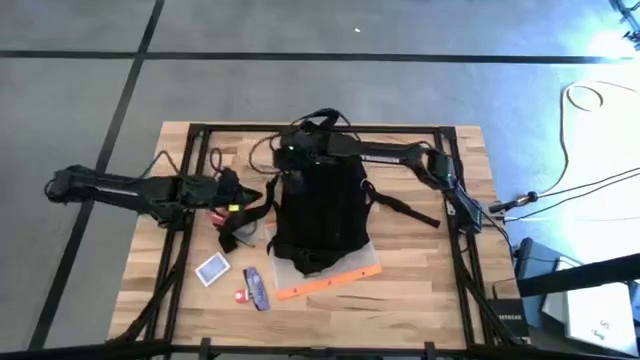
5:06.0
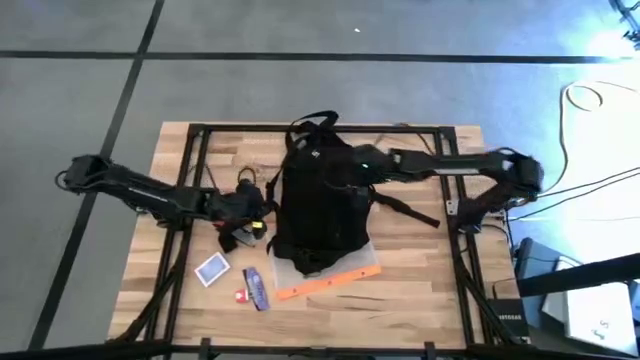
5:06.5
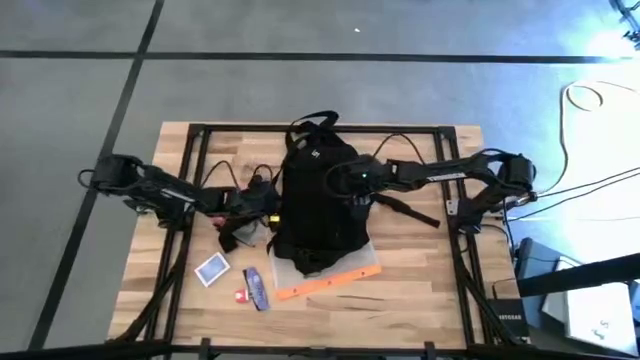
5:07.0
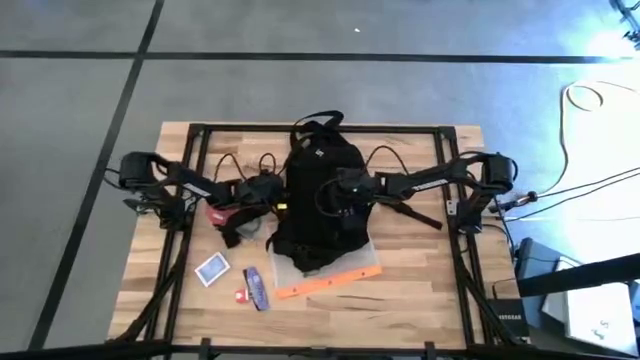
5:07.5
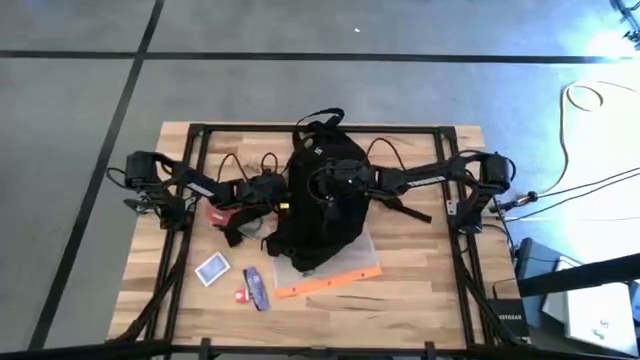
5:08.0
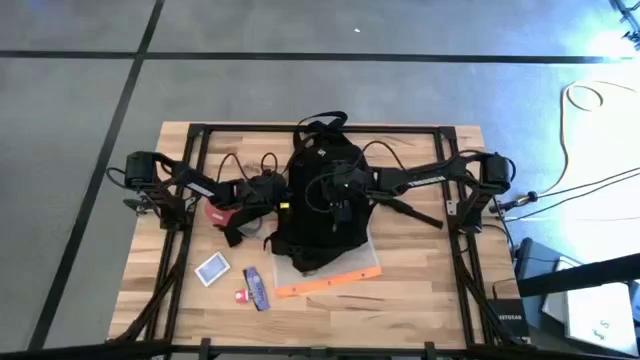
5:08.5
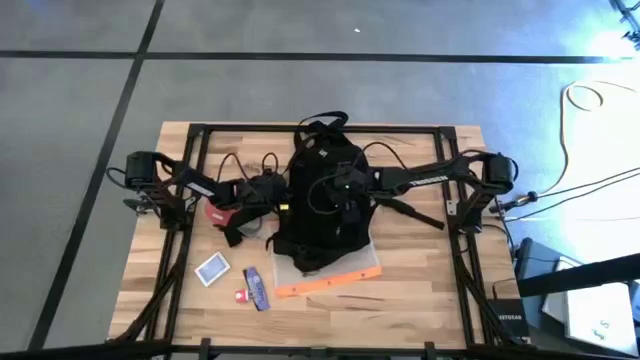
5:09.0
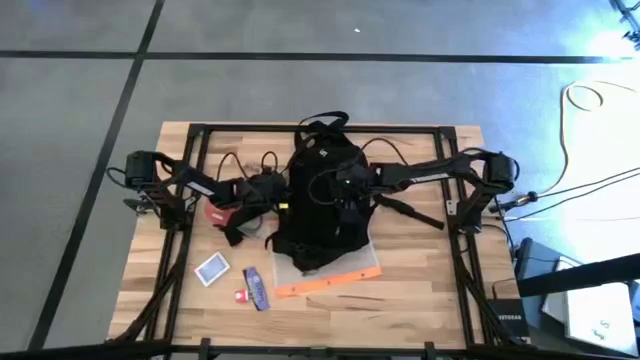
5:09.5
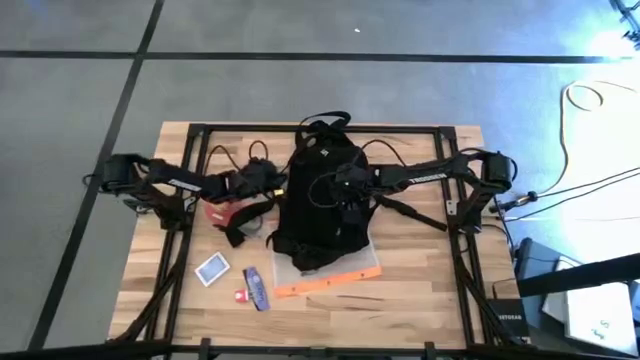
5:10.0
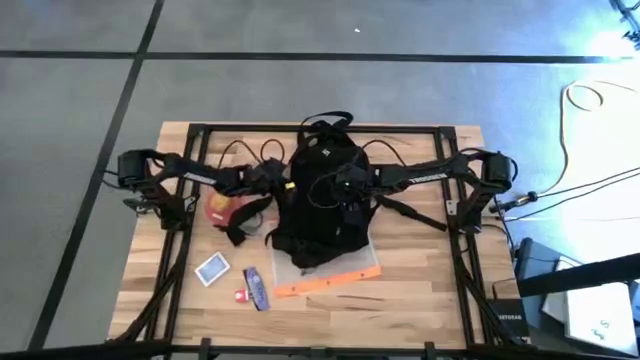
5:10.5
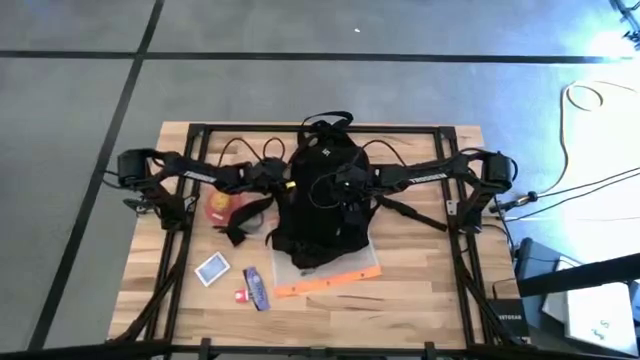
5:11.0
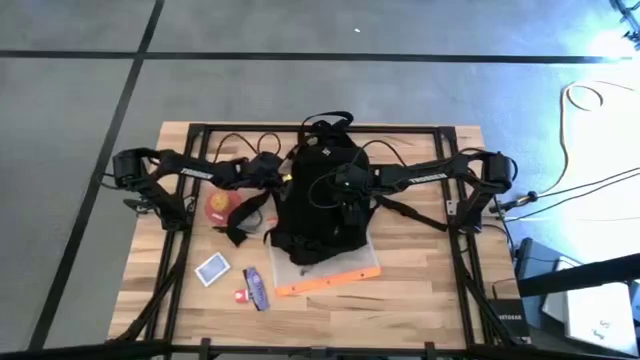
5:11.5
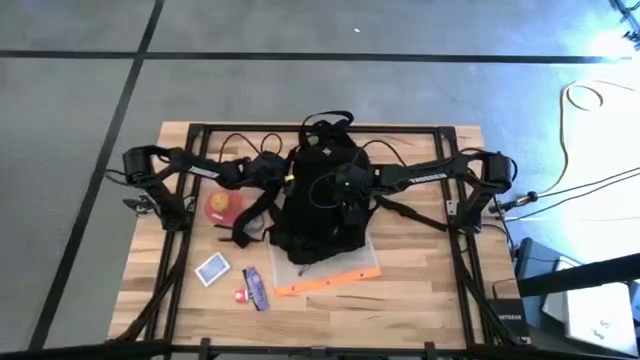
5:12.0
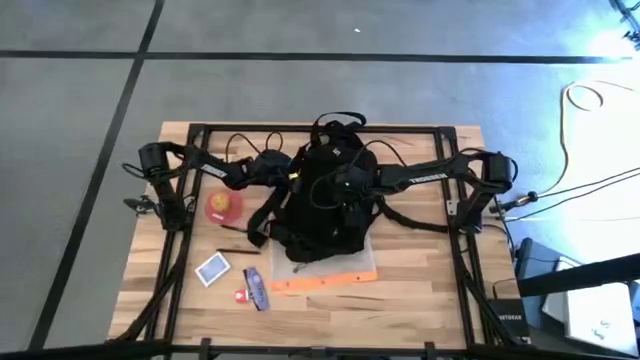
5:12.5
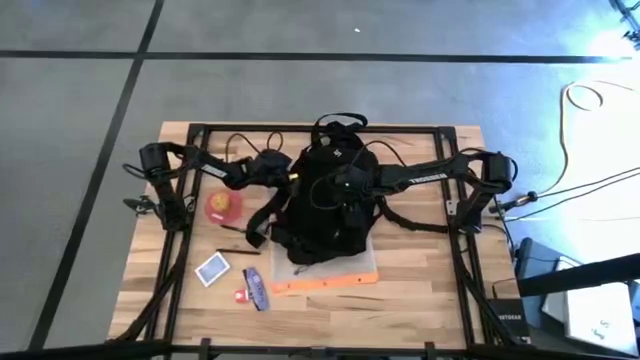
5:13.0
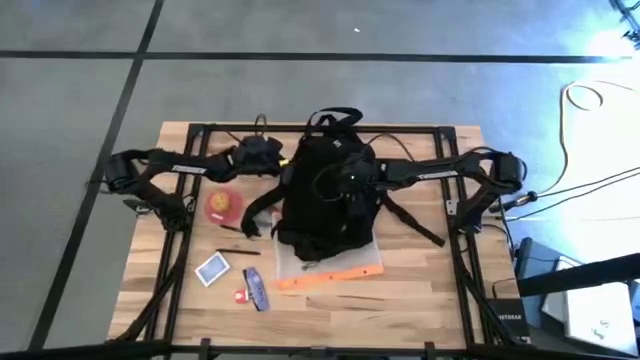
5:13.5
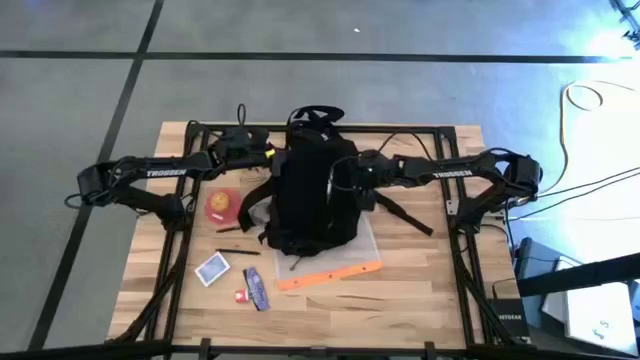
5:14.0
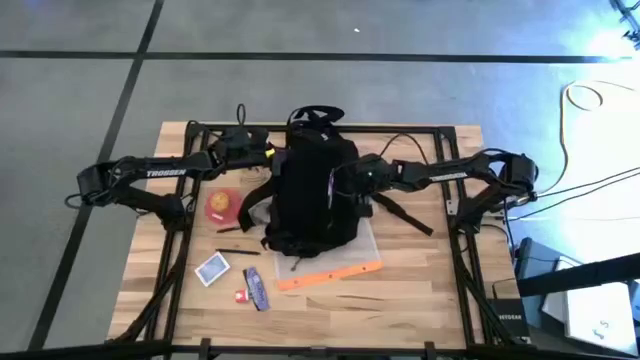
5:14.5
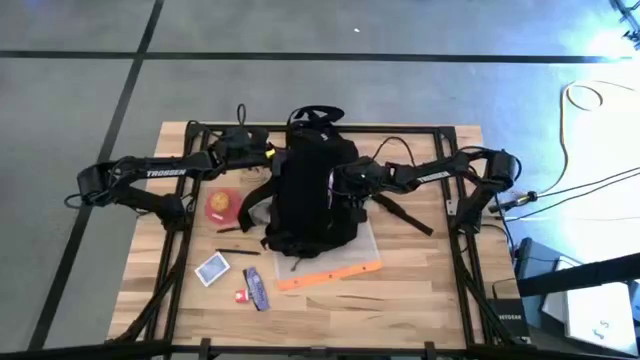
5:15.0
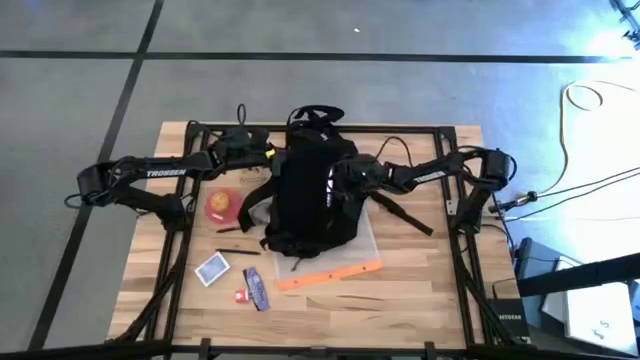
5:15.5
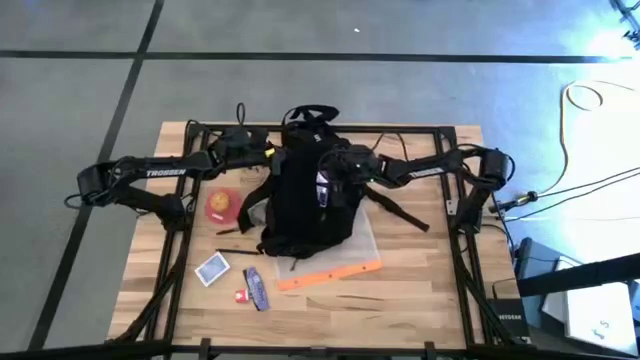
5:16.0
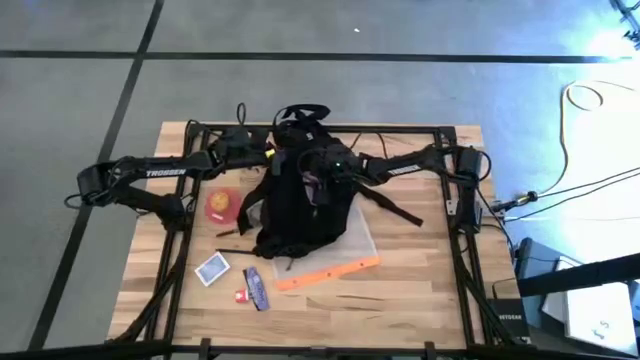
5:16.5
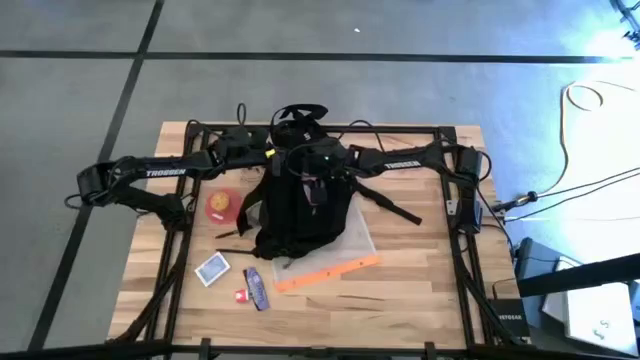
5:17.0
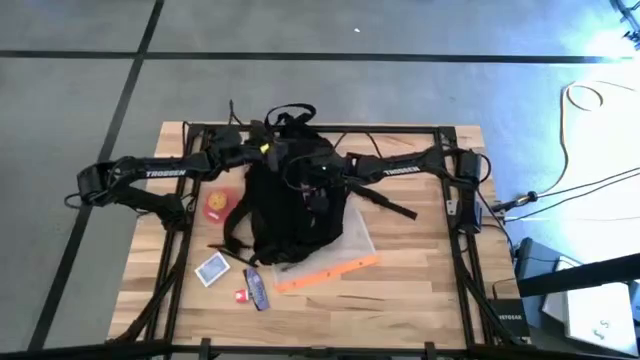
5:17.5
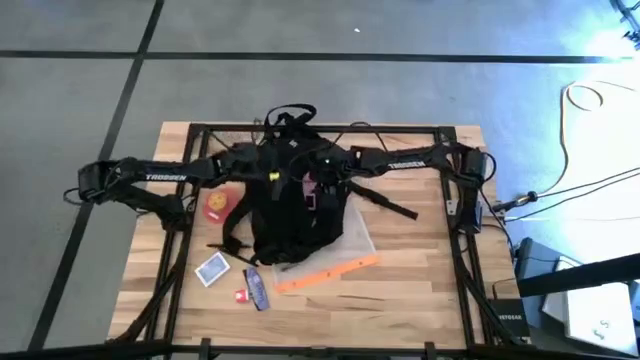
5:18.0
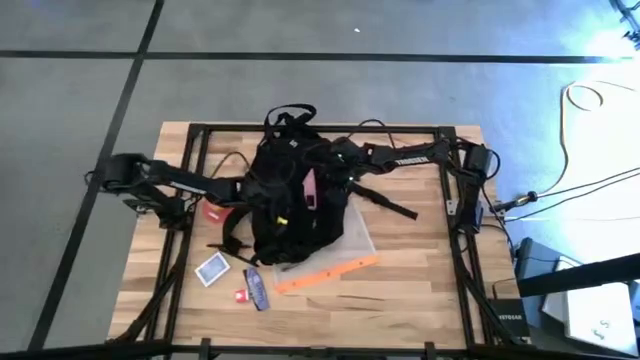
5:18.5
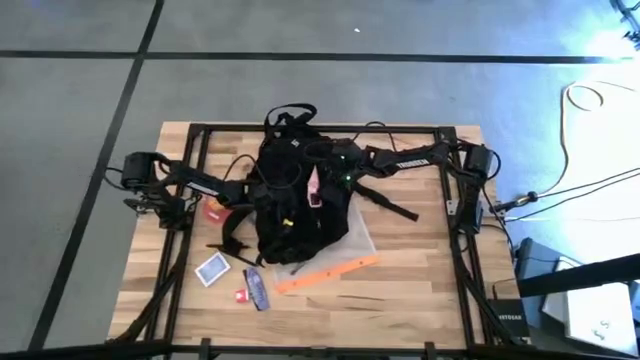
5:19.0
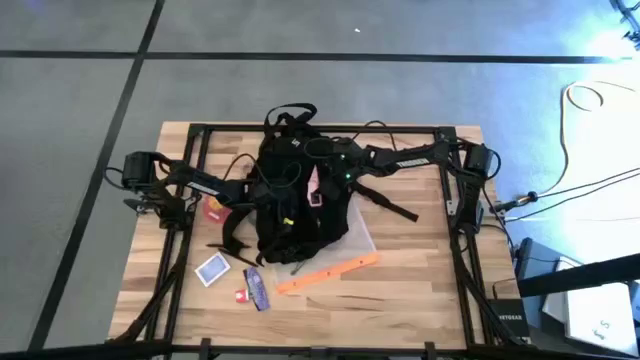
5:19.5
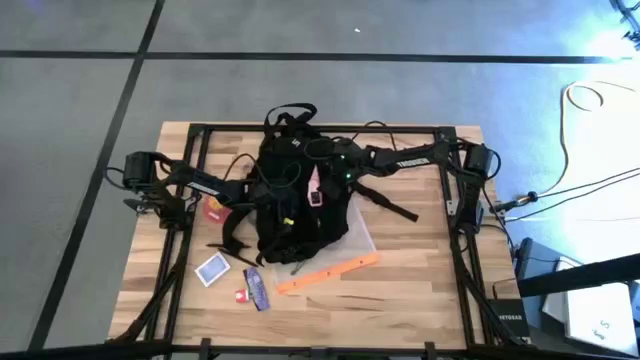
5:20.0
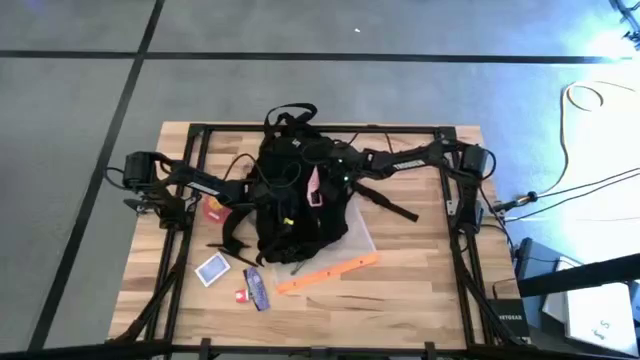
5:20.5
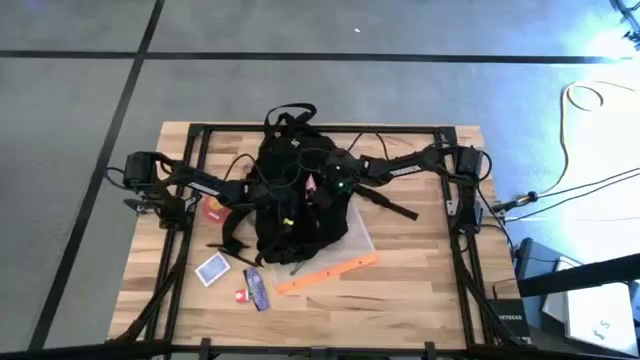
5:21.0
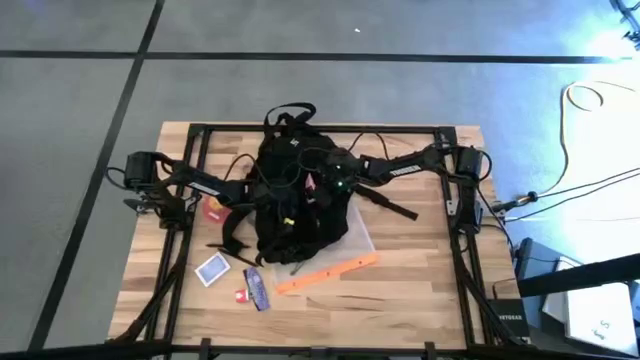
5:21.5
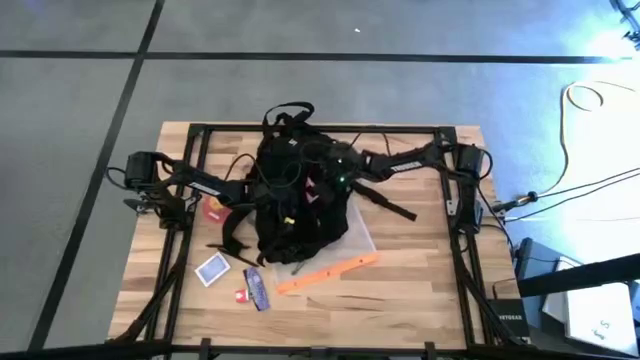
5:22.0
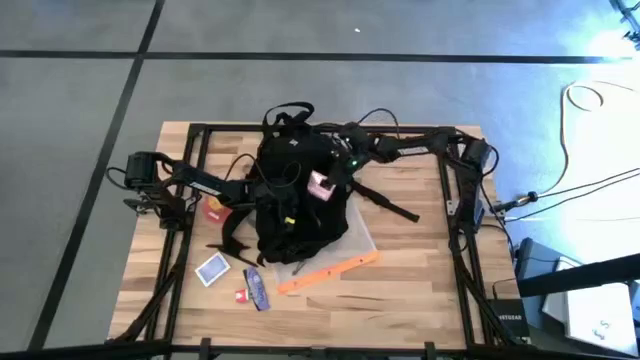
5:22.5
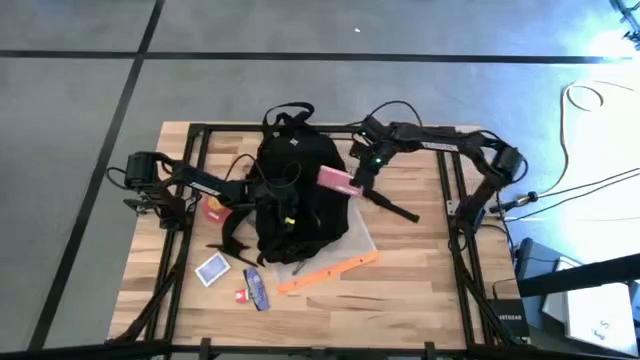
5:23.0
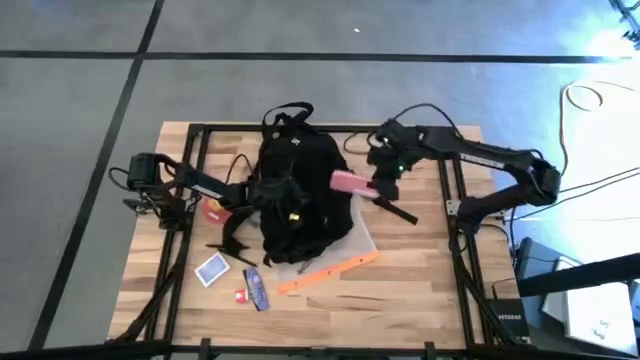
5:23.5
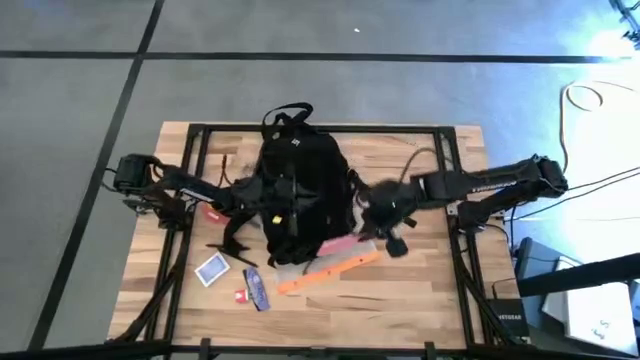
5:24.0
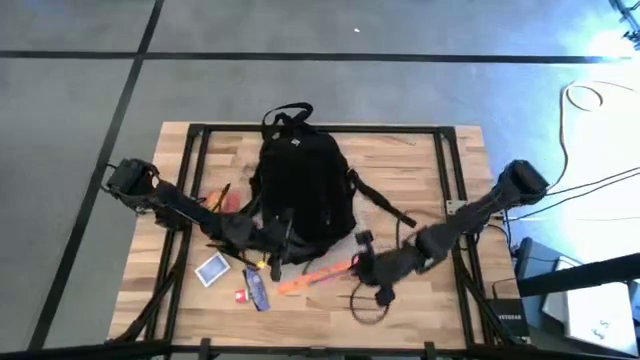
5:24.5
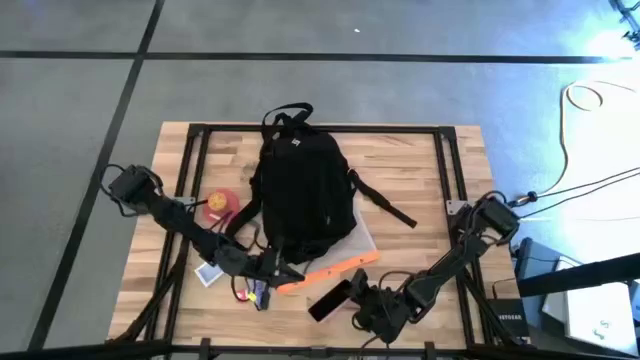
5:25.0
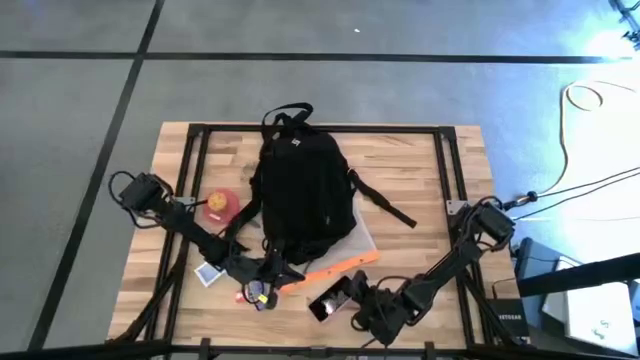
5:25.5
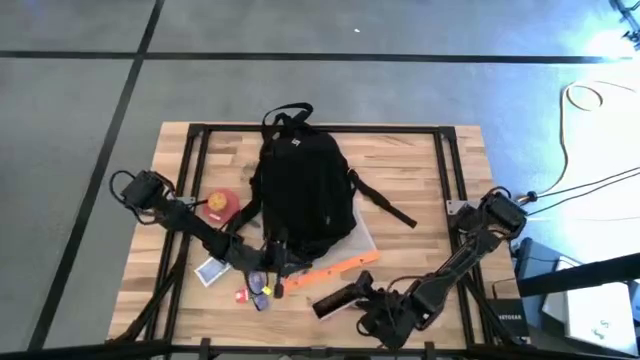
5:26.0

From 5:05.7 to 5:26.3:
Task: Unpack backpack
Remove the pink cellphone from the black backpack

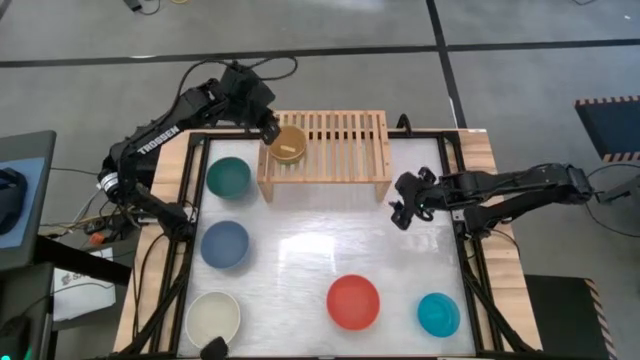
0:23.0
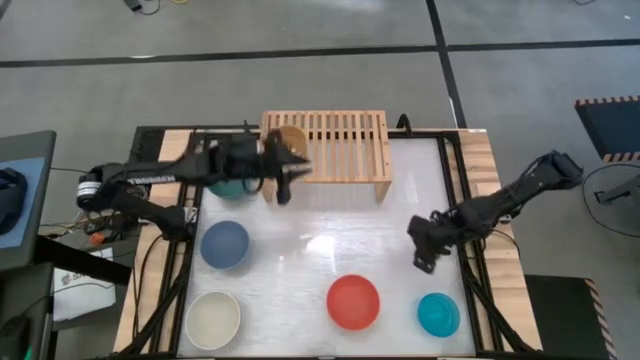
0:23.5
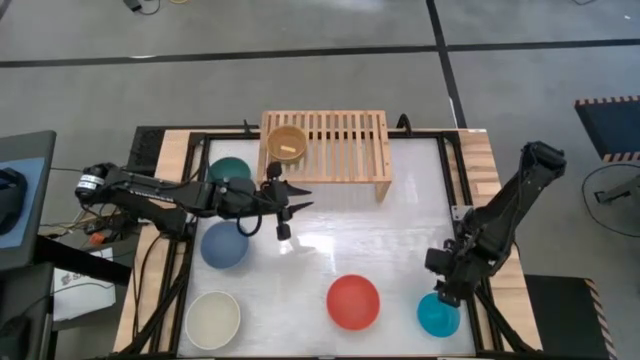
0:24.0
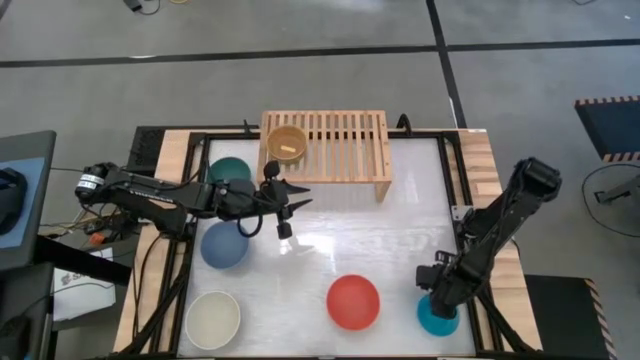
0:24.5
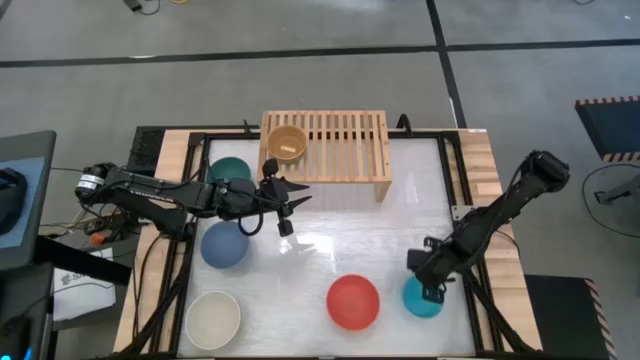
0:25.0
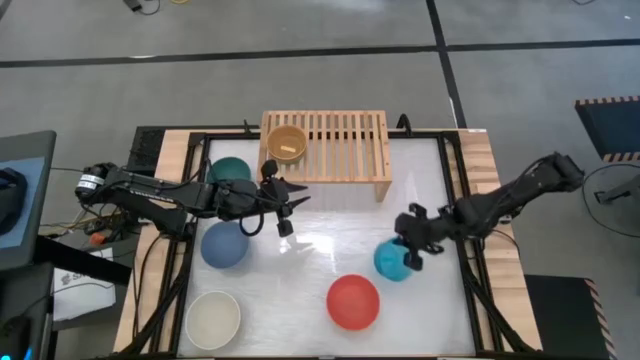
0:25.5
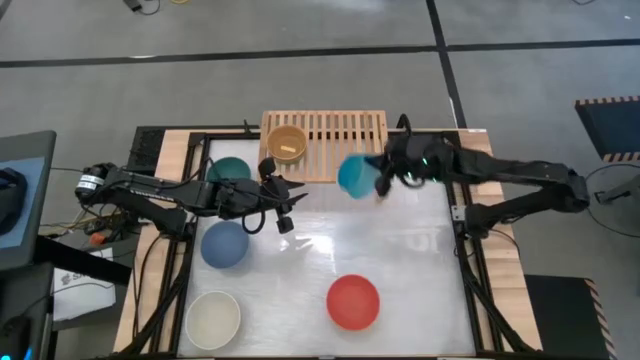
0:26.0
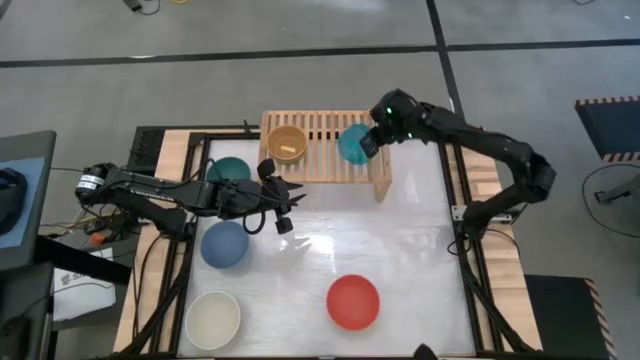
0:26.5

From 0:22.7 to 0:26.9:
Task: Place and stack bowls onto a shelf
Put the transparent blue bowl on the shelf
